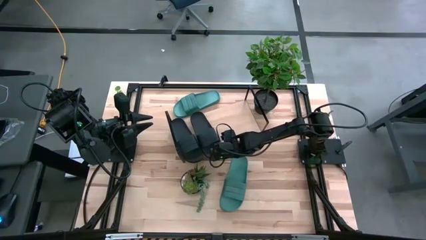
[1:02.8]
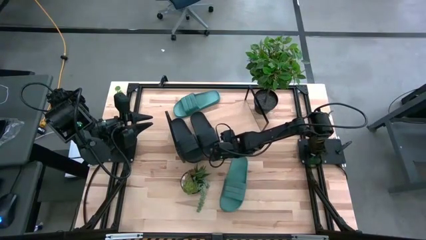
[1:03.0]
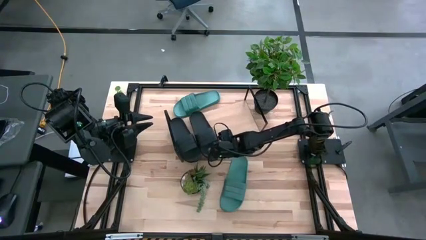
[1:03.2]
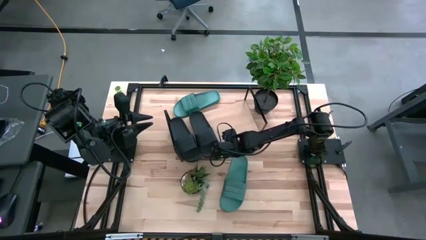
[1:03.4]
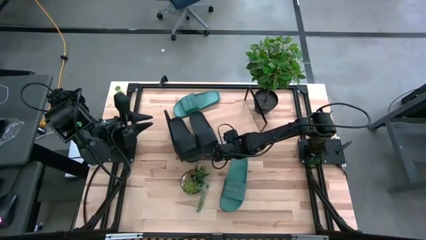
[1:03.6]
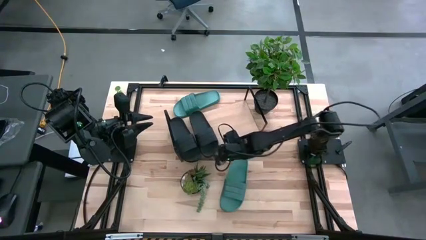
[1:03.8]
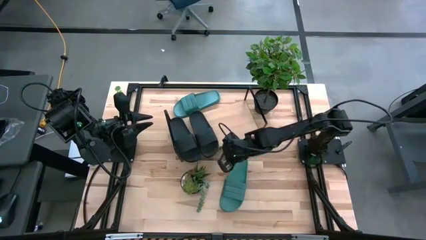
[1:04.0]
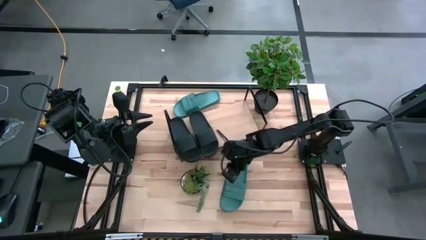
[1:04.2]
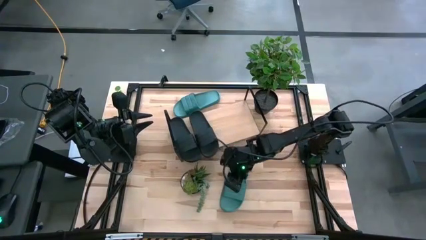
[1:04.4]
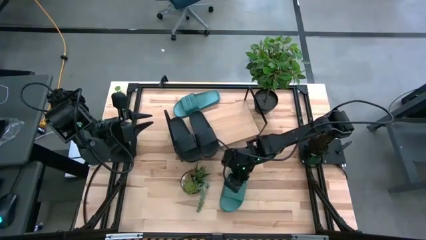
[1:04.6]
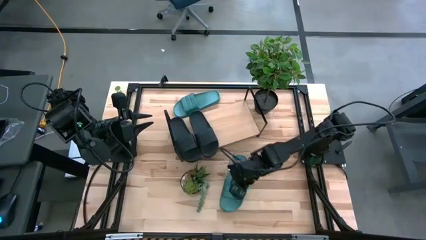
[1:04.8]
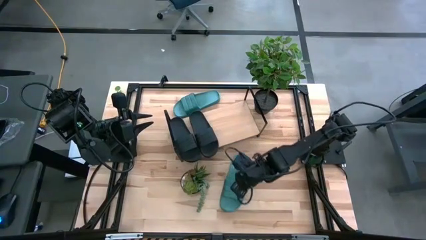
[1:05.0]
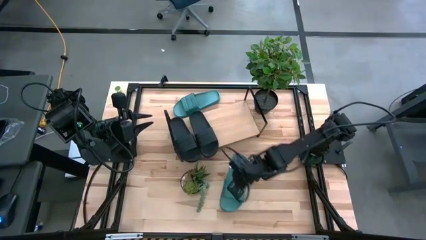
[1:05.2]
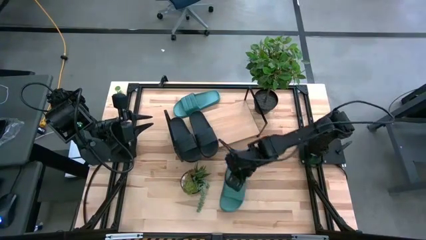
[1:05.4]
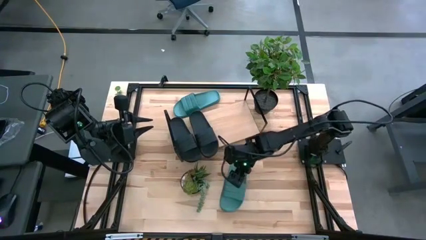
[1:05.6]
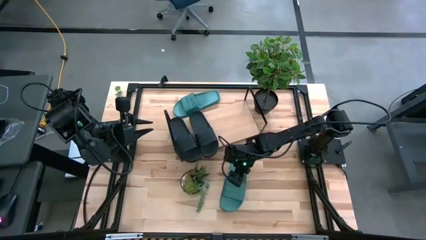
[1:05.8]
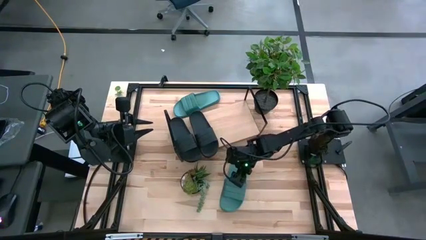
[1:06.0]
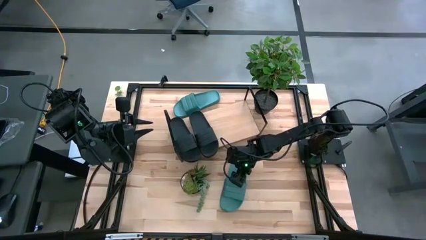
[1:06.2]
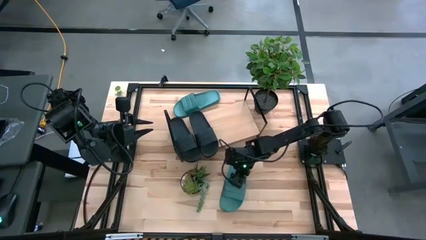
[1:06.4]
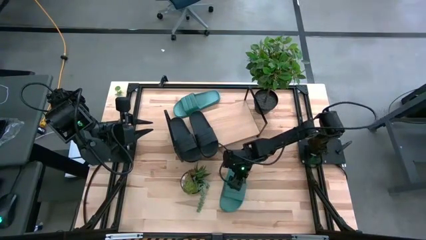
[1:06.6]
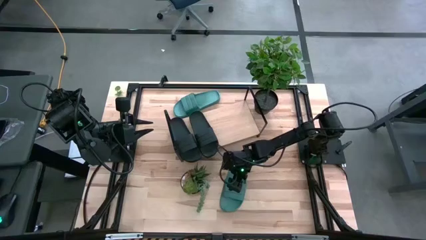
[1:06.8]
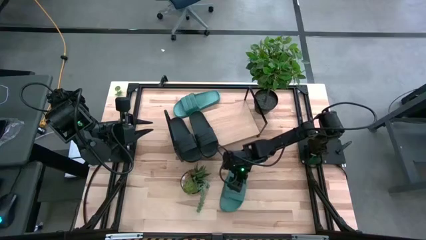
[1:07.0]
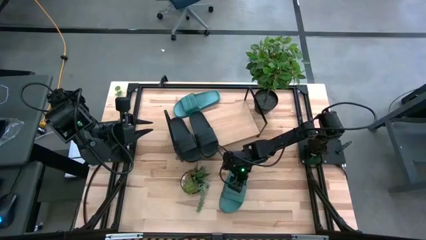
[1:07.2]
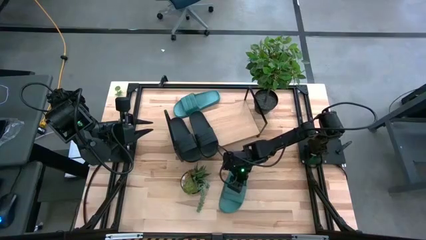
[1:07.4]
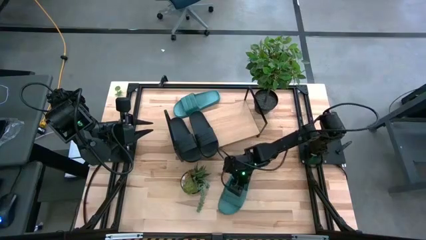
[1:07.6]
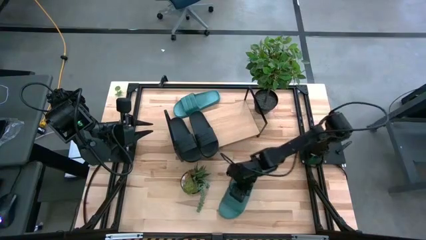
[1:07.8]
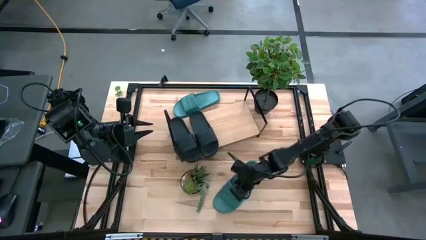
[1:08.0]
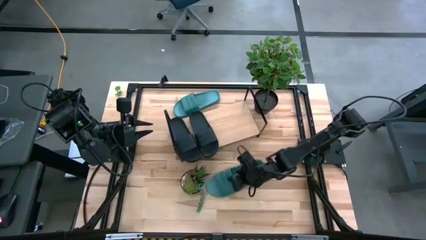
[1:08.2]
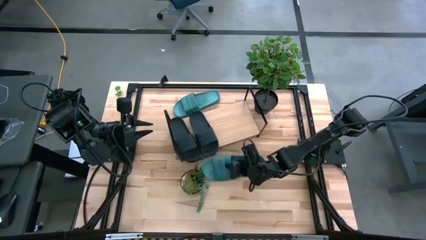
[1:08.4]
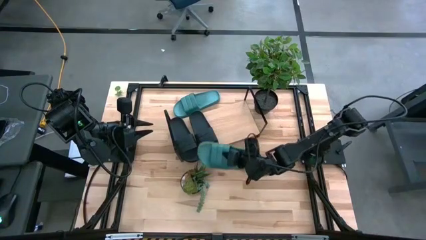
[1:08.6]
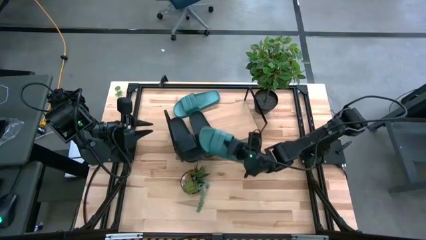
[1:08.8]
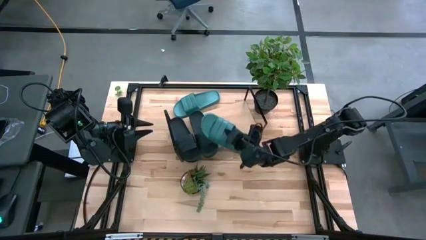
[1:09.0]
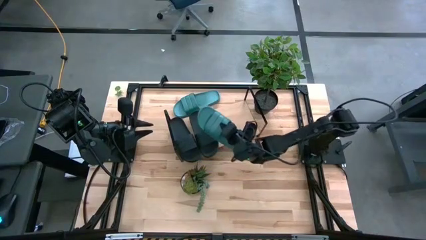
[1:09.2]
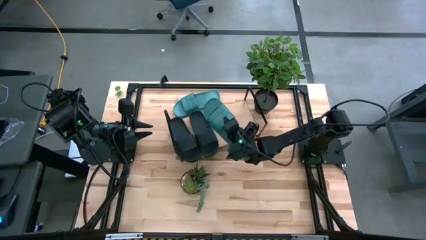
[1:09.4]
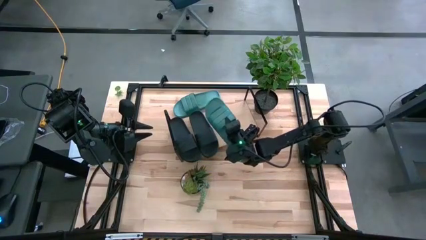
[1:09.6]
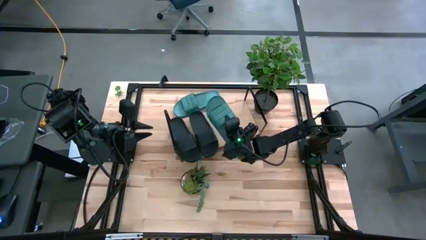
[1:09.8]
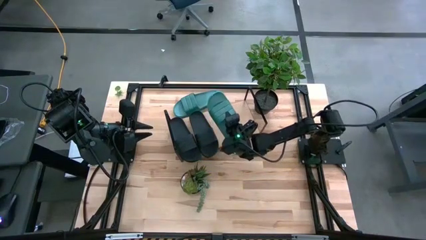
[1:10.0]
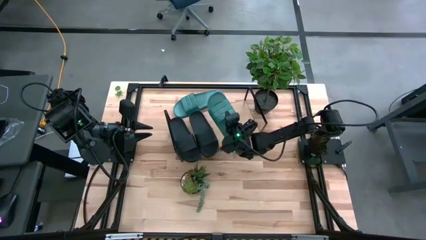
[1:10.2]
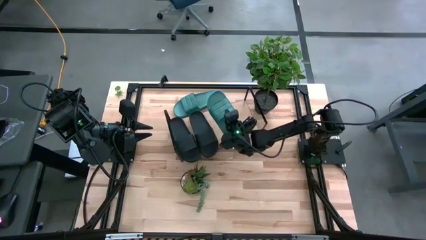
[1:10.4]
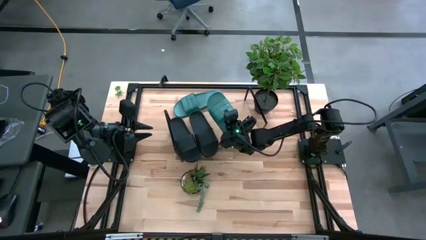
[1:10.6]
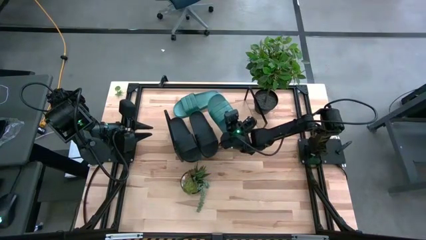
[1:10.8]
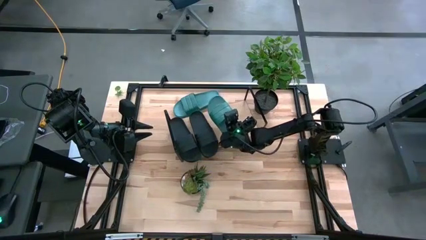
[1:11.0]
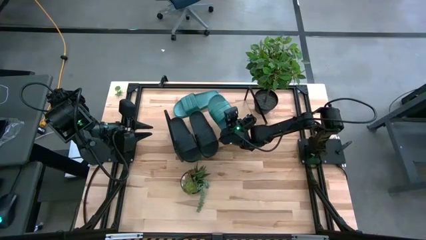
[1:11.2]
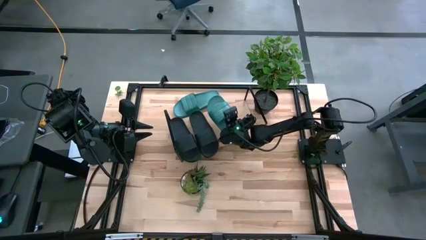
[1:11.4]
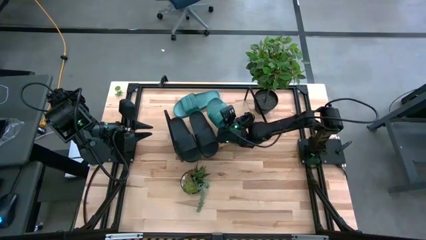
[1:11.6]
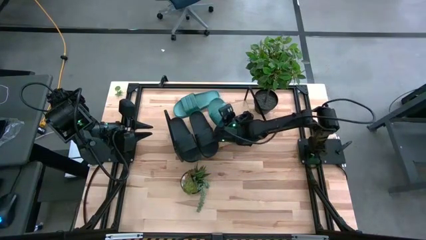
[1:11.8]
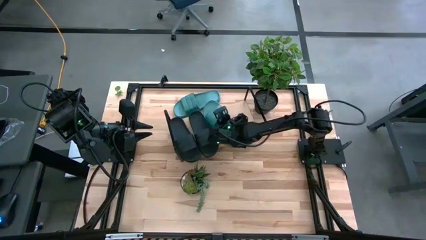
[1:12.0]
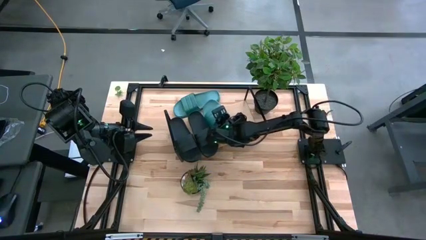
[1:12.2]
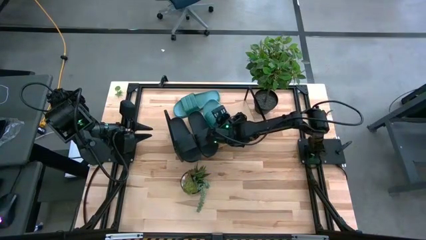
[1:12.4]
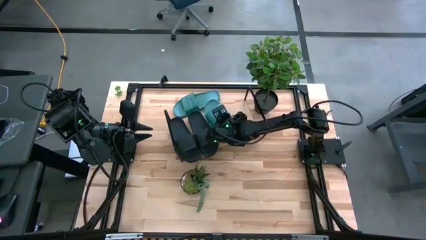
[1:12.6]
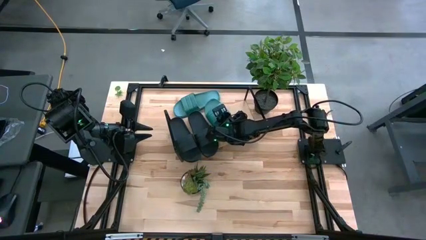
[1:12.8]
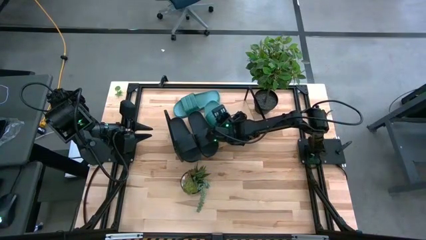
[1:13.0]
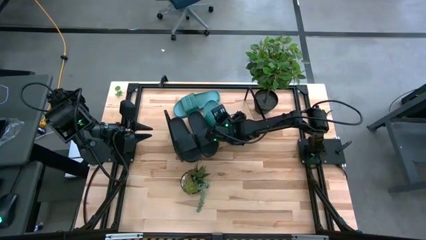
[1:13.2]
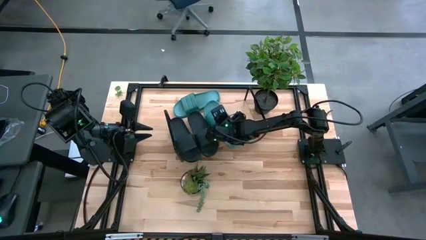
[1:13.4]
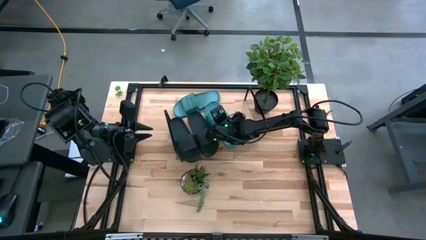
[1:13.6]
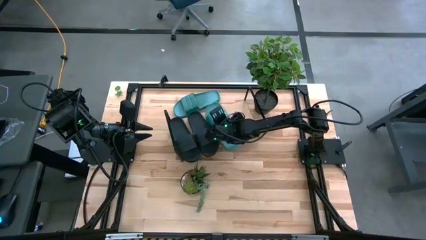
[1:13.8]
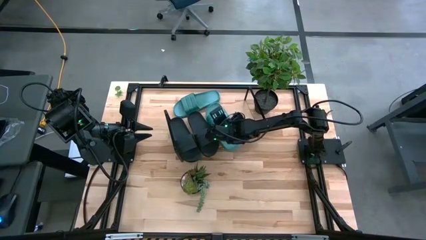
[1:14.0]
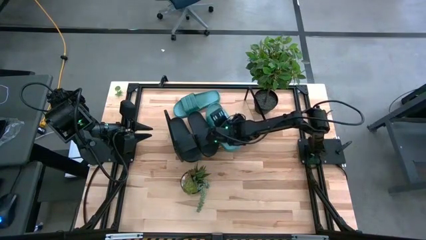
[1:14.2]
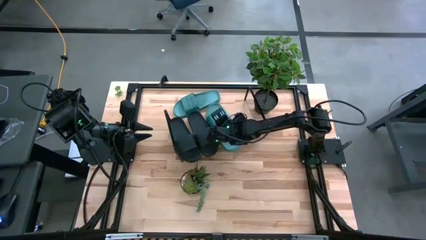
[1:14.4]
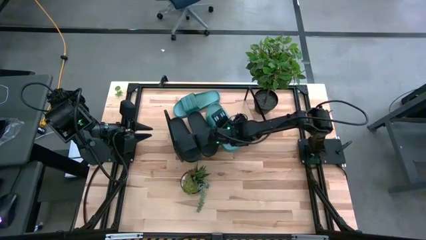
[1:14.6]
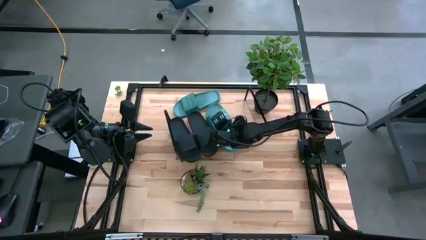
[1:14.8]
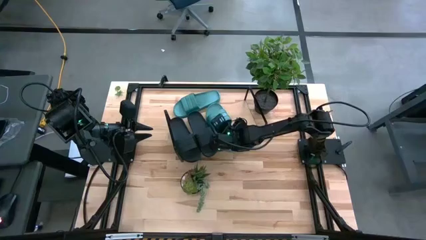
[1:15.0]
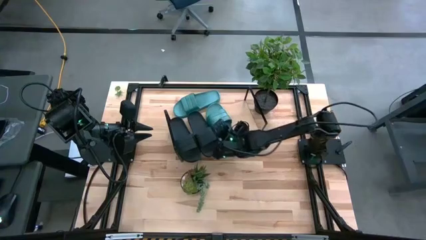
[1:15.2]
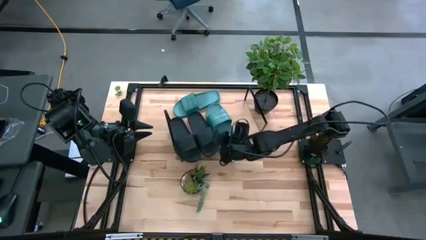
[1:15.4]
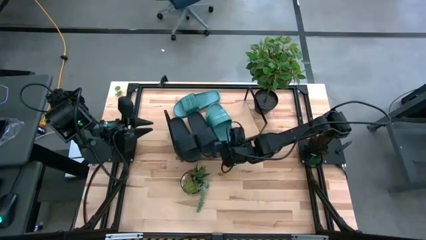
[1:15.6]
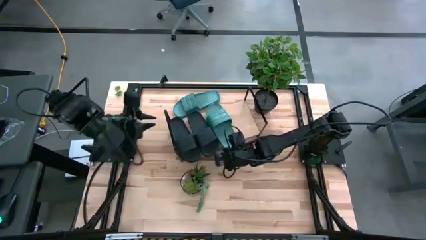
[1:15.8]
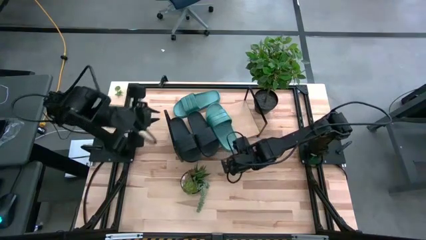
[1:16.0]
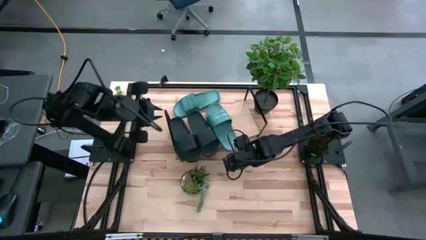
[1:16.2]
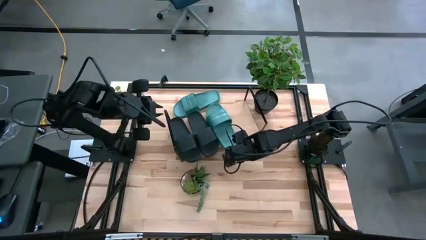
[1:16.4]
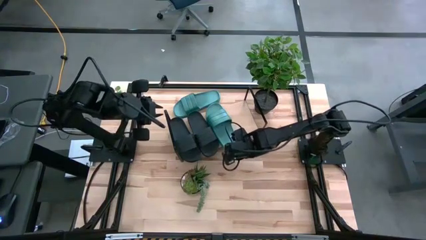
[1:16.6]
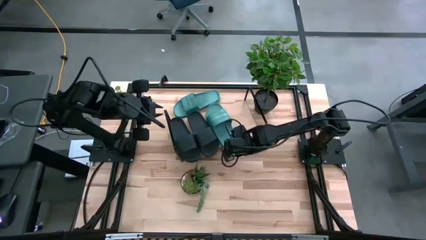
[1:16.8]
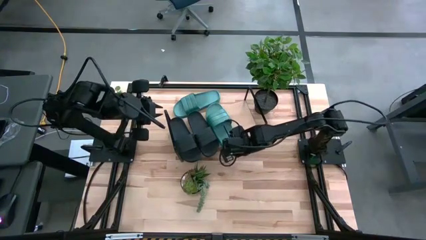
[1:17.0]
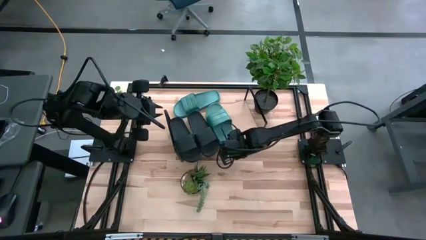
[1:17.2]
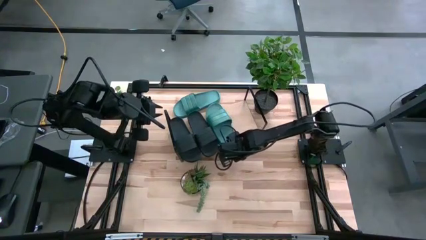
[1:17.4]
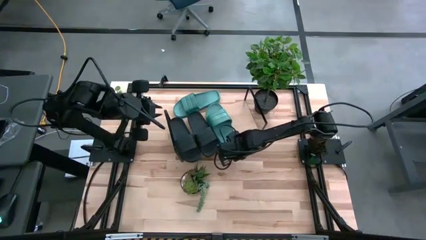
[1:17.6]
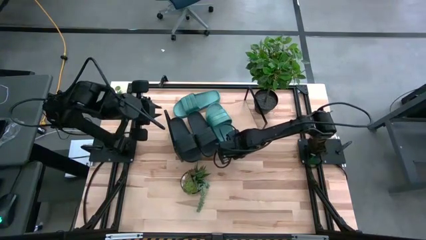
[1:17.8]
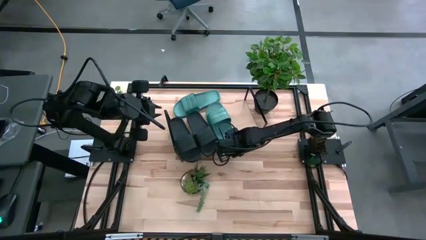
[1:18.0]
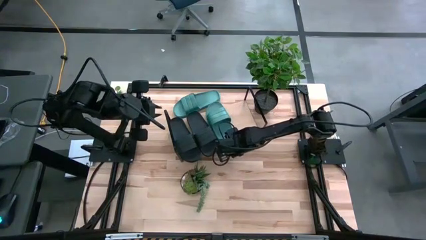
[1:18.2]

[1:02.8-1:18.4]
Task: Pick and place slides into the shelf
Put the bottom blue slipper on the shelf

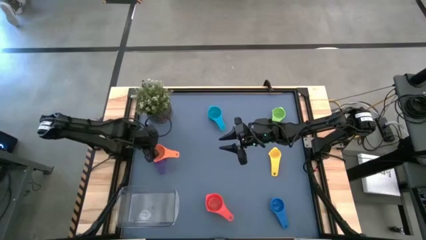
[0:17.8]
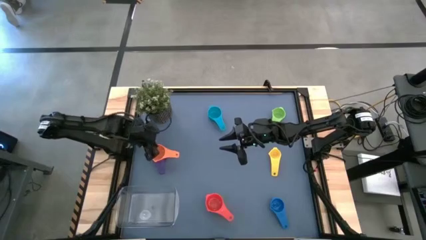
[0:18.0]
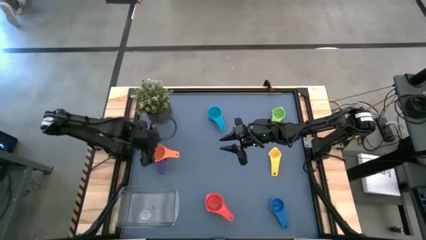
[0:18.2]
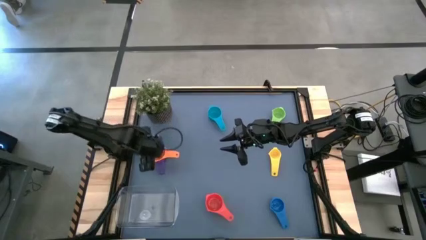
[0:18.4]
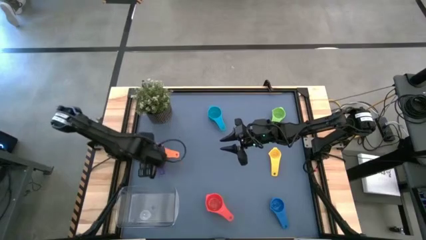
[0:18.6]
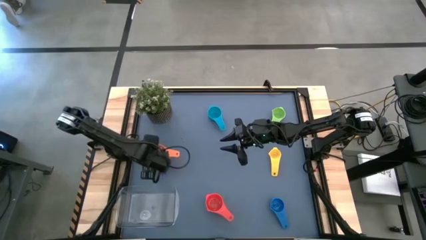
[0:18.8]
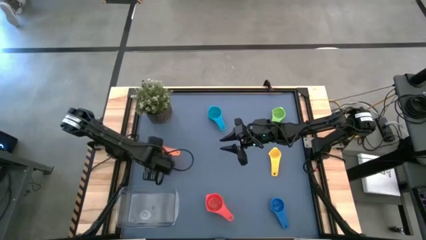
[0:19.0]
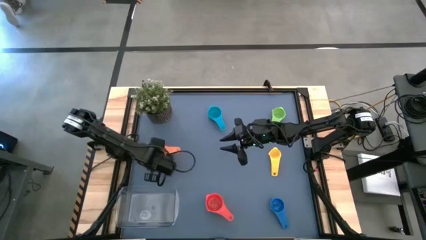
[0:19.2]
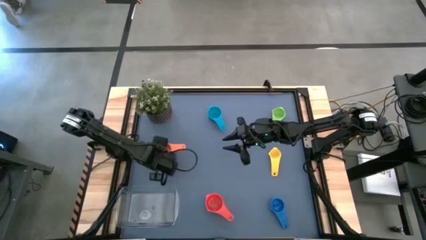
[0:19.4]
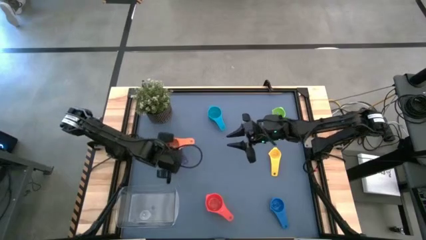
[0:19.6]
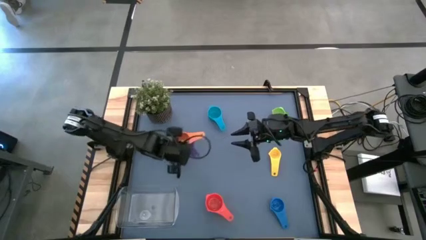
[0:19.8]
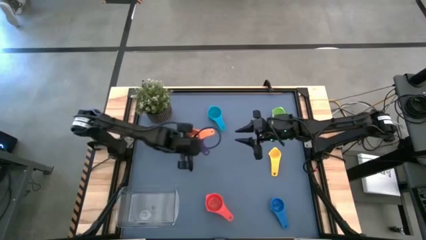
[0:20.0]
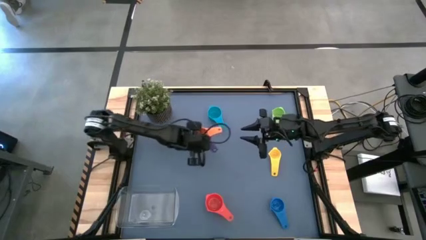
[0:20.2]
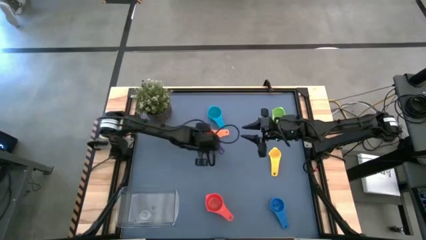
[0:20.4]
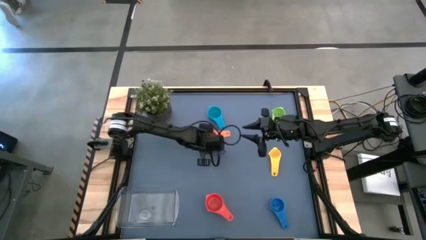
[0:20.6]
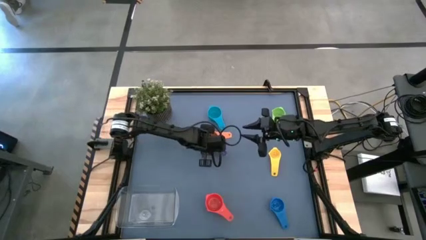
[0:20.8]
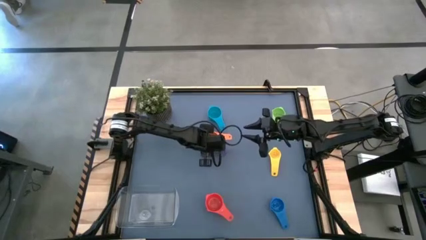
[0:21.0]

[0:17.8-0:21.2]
Task: Nest measuring cups in basket
Move the stacked measuring cup to the middle of the table
